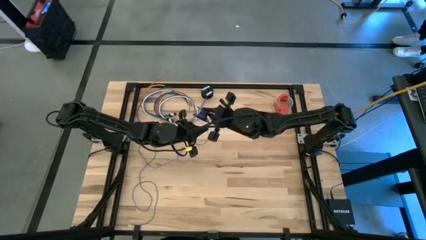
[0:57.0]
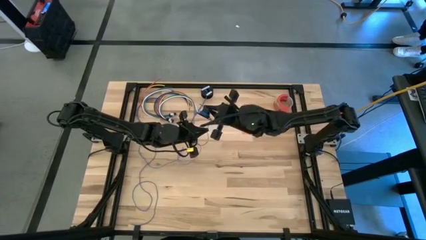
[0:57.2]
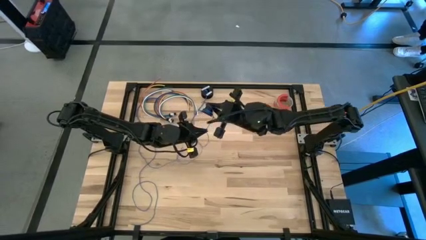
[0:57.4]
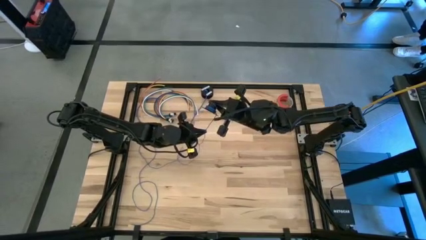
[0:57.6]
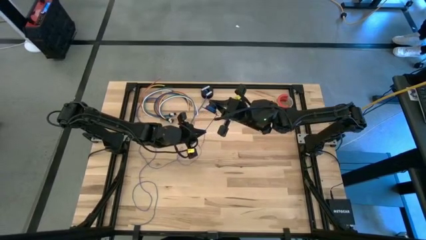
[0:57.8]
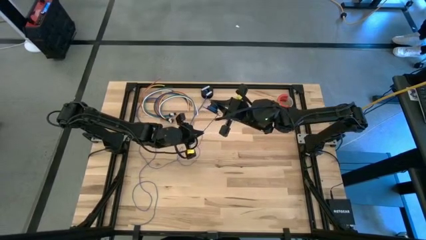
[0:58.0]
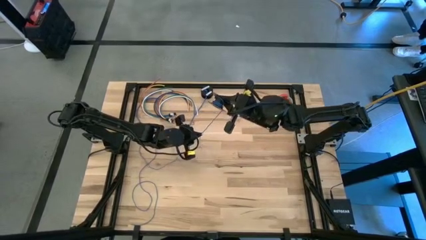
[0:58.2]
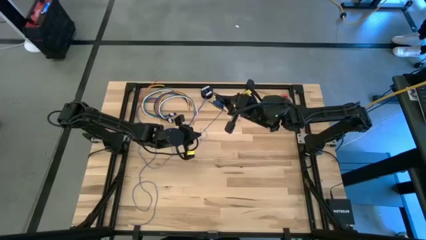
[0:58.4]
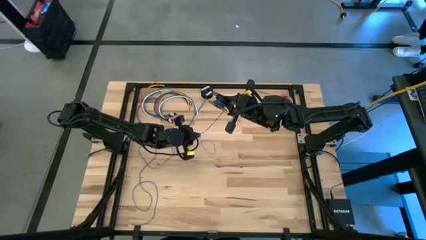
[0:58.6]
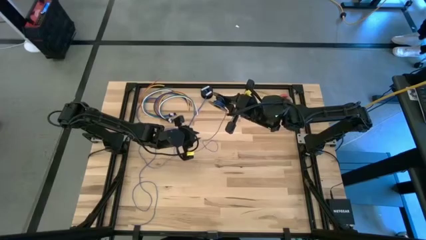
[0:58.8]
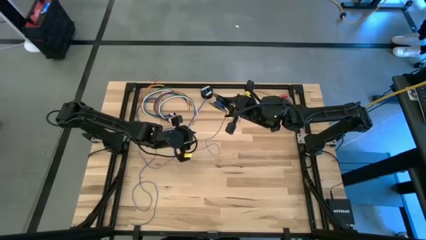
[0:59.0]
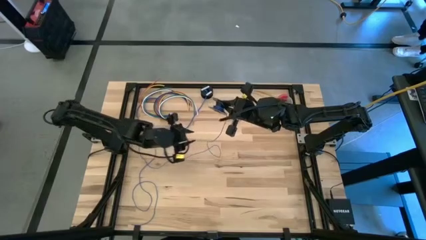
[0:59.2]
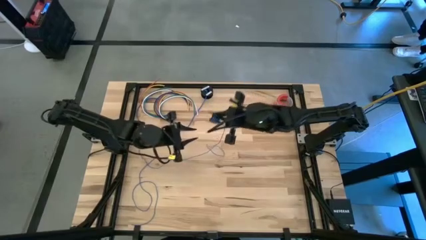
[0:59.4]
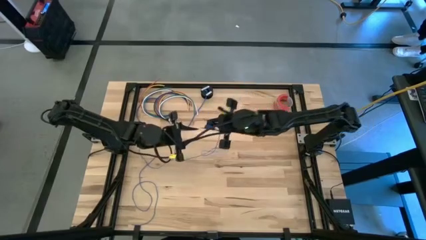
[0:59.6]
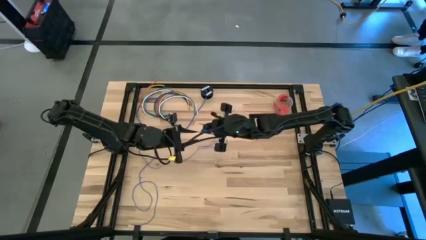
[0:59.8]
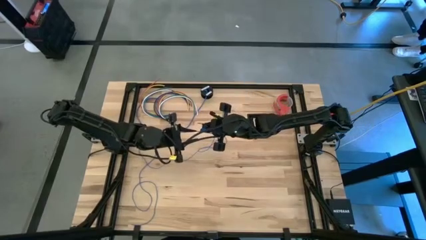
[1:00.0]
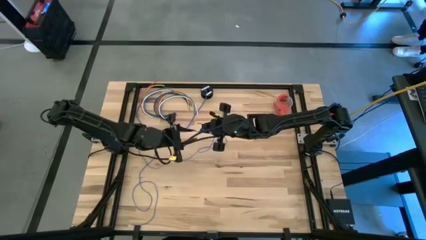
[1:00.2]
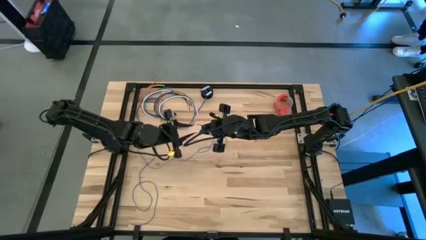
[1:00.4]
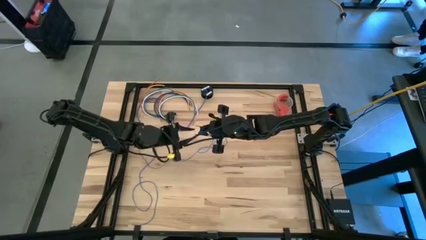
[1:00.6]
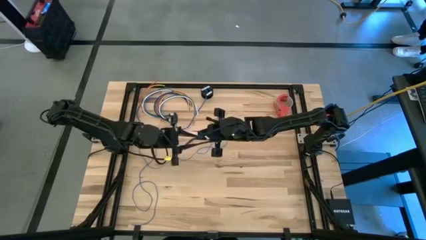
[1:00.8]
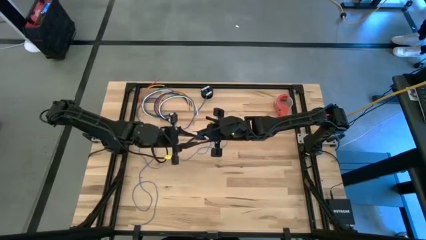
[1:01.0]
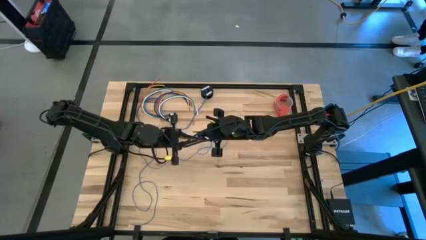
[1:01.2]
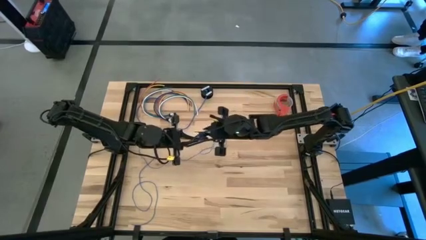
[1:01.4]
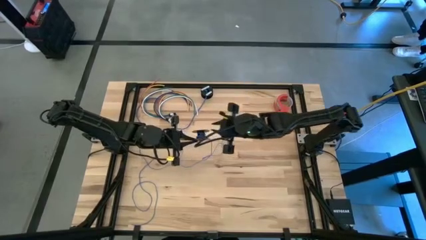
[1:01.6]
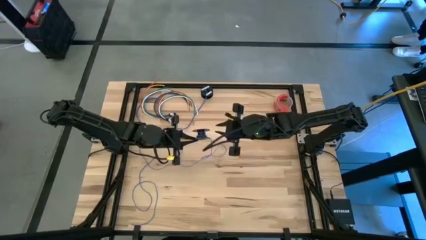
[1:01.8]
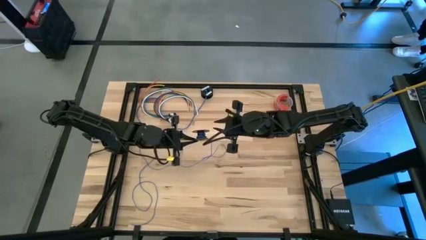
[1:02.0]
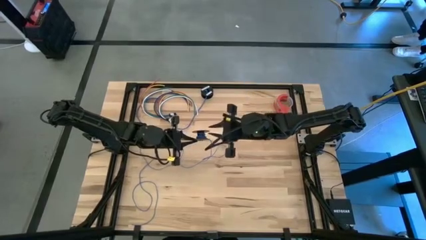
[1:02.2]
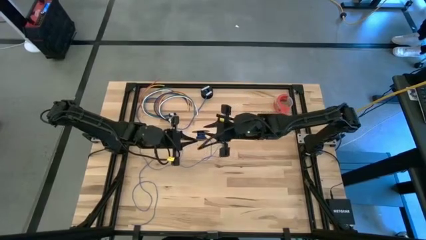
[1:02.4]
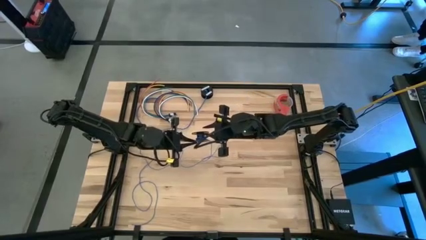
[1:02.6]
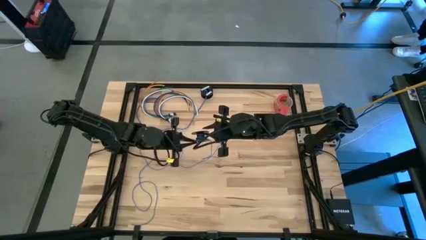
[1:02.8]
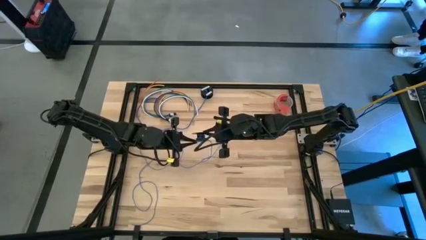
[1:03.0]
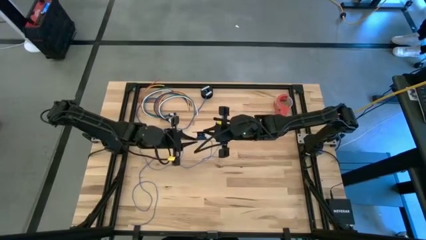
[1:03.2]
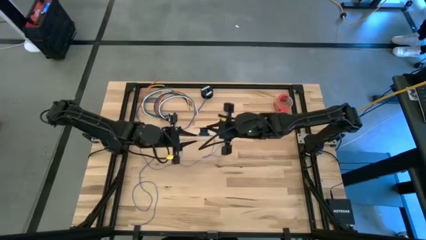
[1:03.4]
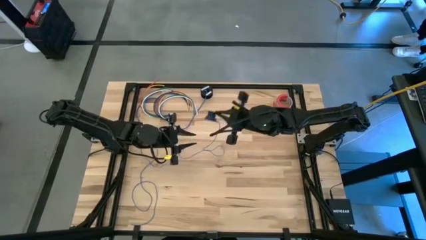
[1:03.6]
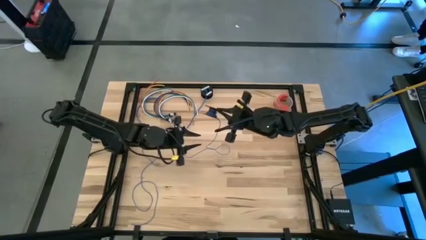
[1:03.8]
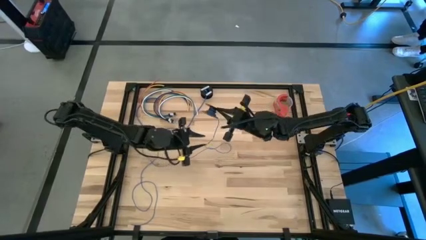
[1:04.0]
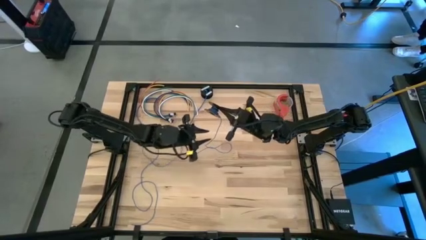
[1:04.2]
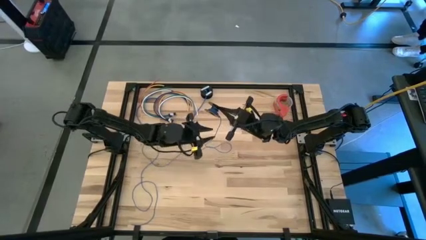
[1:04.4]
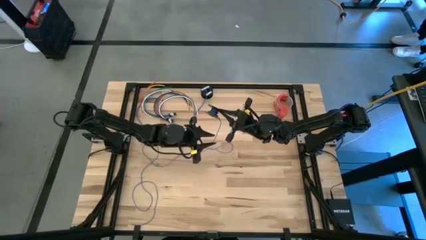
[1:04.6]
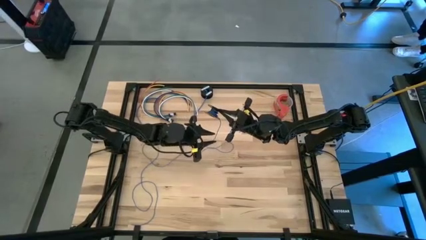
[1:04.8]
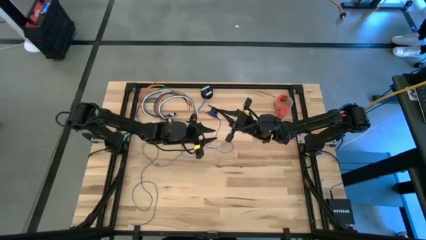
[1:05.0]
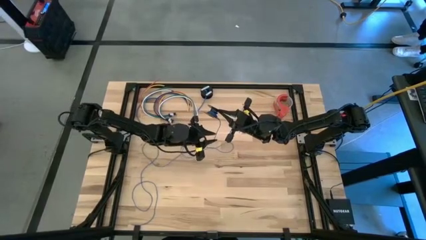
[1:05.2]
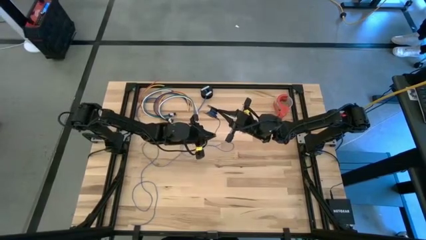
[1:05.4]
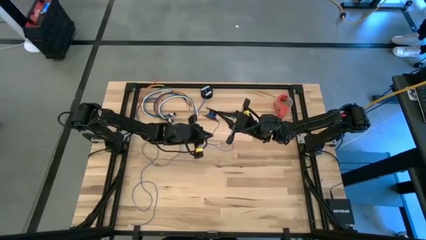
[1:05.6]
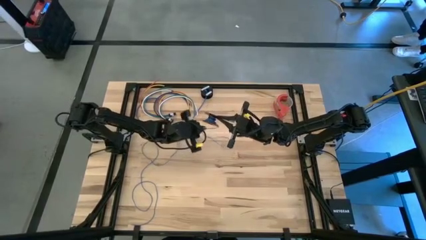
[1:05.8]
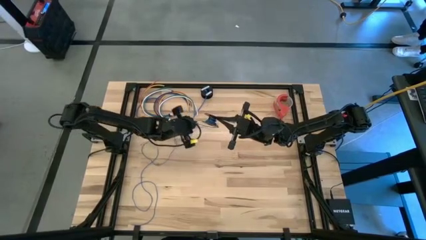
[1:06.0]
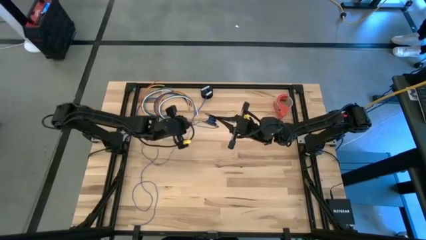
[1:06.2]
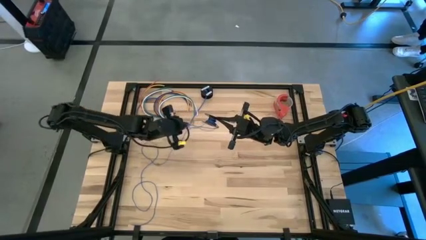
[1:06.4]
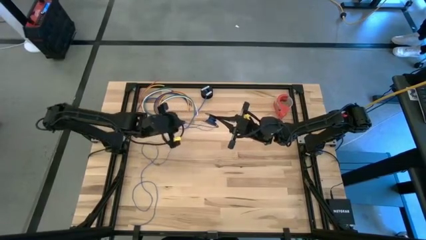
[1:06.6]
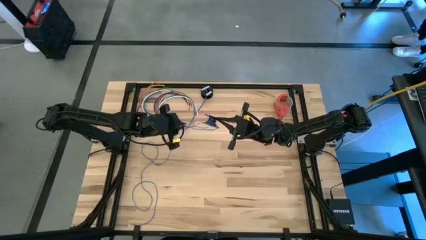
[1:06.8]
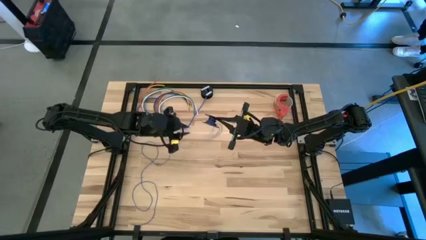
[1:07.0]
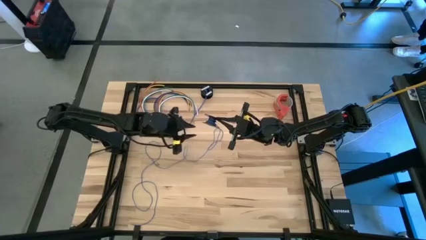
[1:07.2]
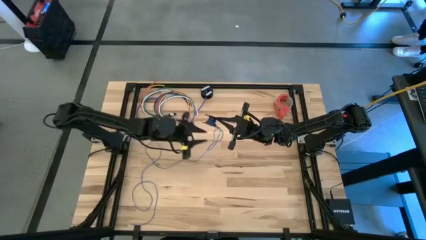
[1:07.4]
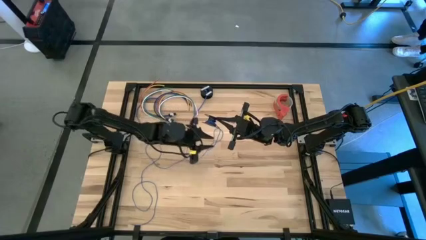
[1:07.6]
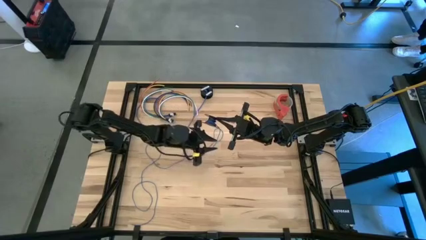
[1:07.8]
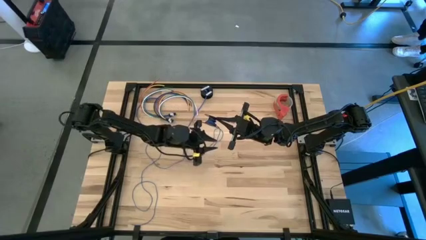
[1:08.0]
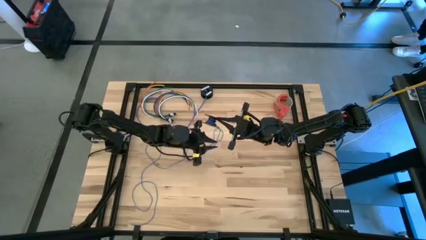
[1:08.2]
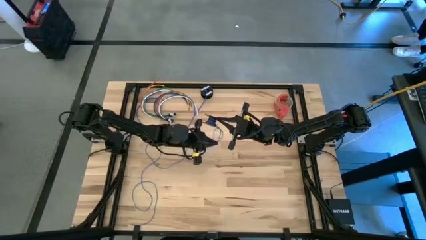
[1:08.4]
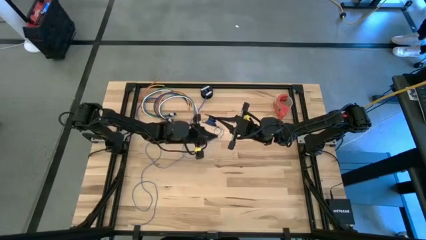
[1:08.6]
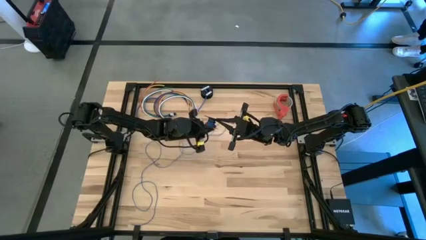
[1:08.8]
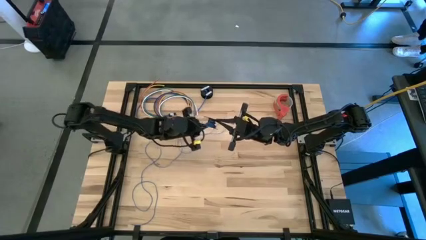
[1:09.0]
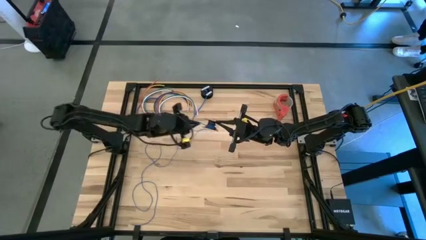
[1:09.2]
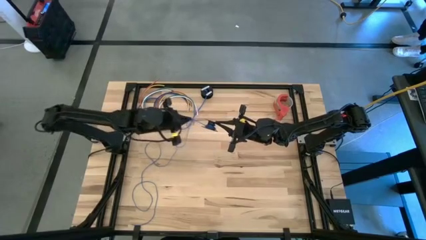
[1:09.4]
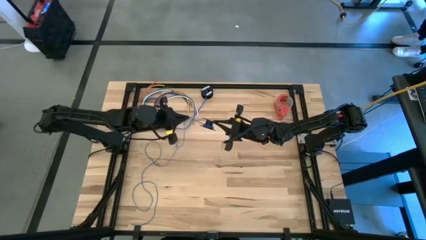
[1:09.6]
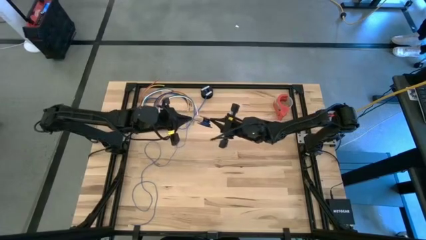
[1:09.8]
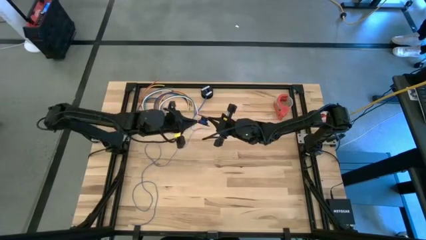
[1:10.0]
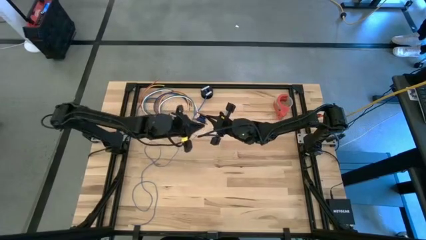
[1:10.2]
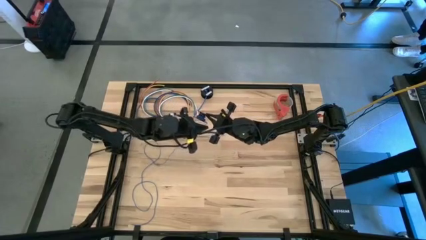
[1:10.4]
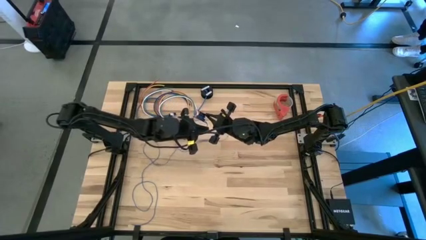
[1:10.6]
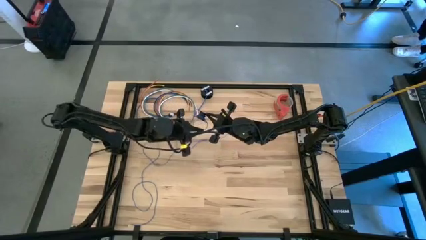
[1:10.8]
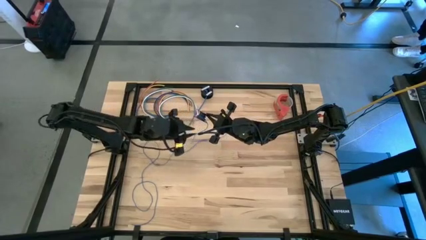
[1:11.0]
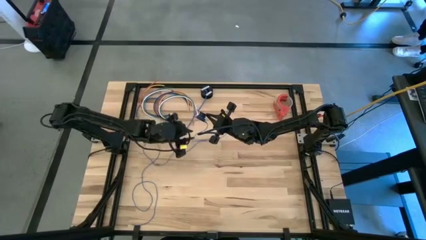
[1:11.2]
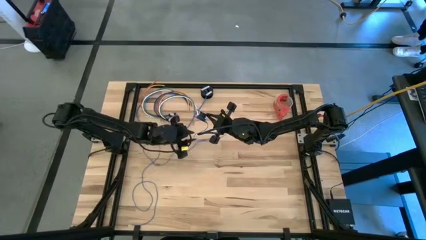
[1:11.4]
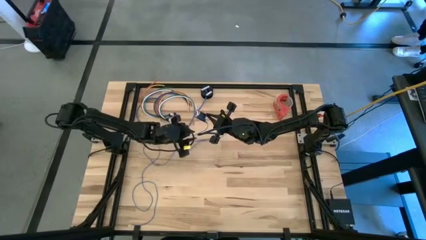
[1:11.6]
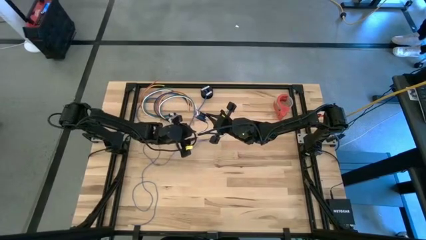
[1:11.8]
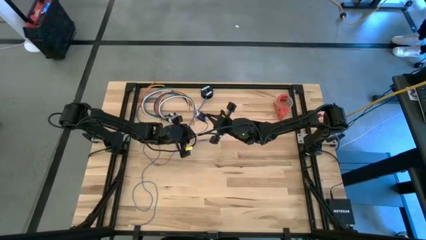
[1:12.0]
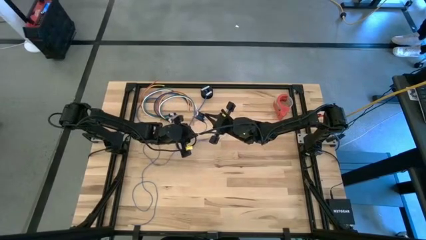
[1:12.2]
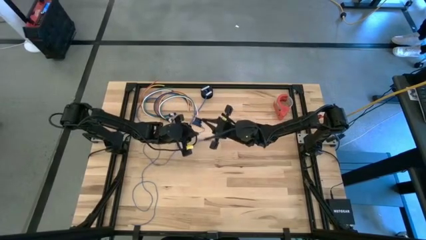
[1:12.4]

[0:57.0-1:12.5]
Task: Coil cords
Coil the blue wire onto the spool

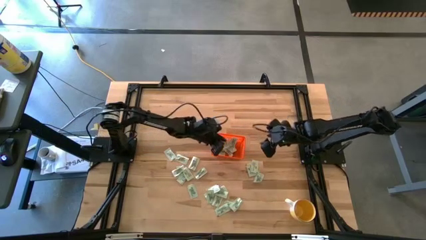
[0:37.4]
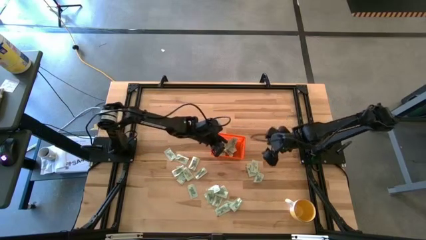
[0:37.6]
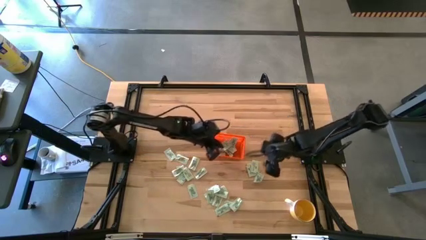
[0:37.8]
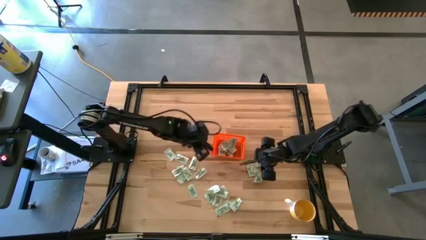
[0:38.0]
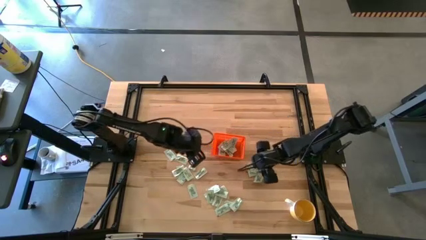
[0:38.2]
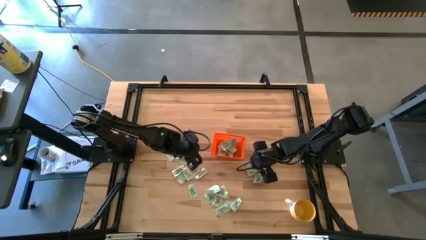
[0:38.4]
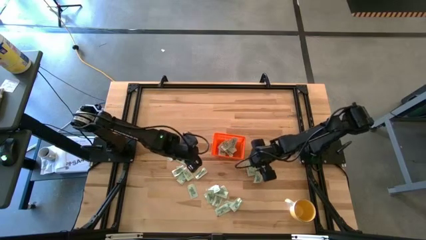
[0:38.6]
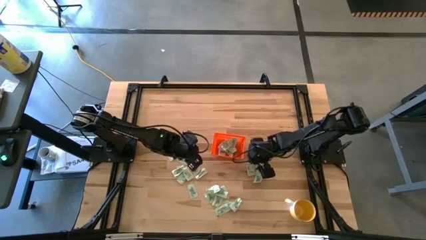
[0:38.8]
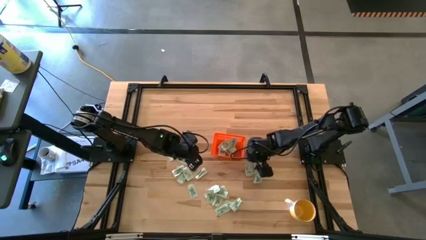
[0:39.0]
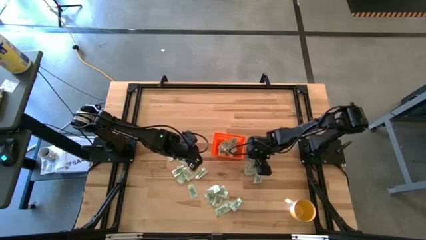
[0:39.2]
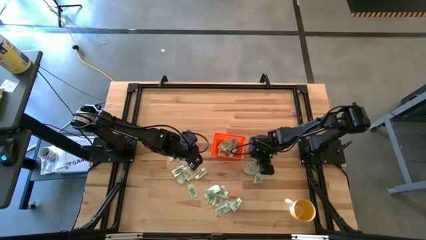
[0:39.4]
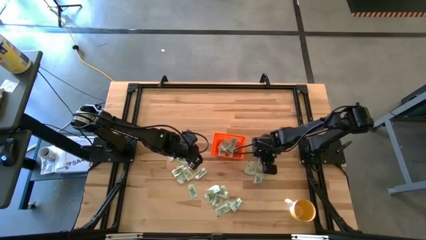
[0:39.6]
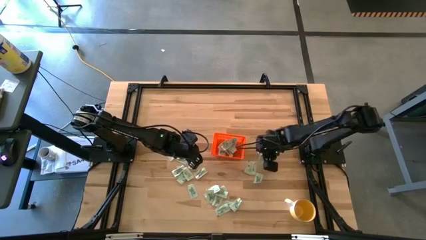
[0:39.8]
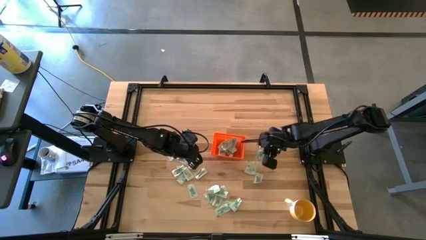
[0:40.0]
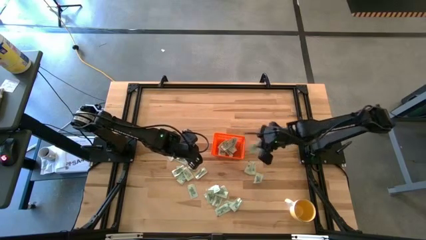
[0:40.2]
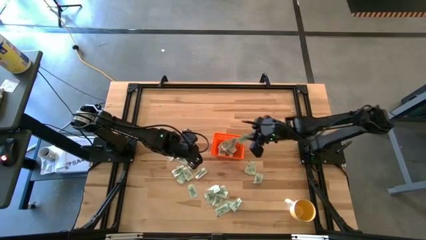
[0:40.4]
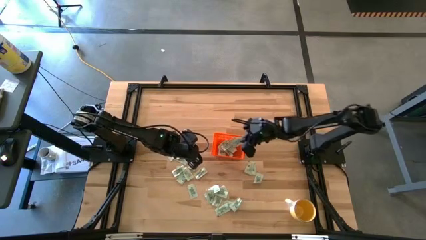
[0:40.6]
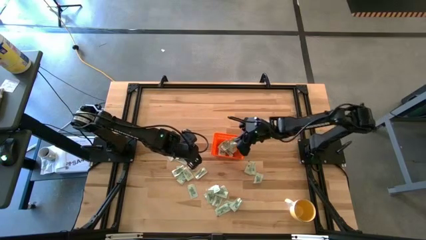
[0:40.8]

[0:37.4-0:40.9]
Task: Pick and place Stevia / Truvia into bins
Put the white stevia packet into the orange bin
